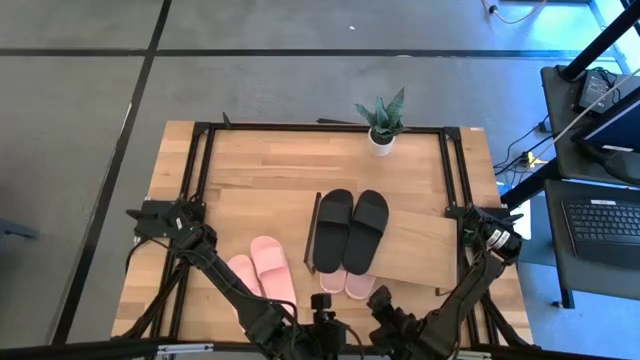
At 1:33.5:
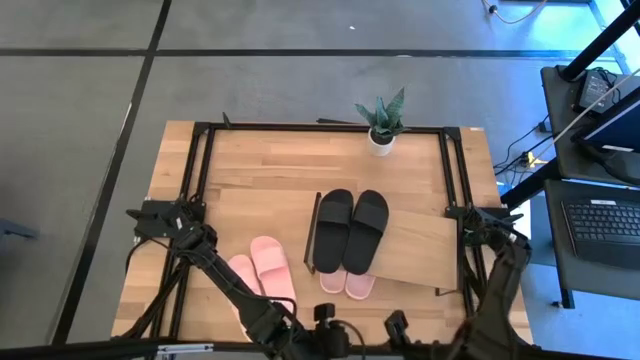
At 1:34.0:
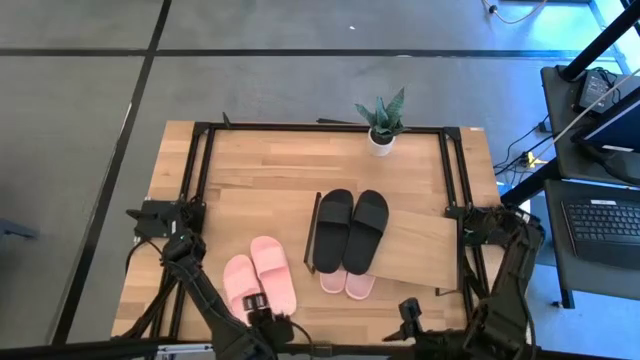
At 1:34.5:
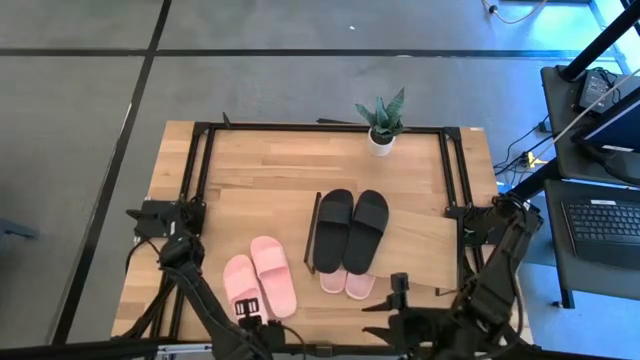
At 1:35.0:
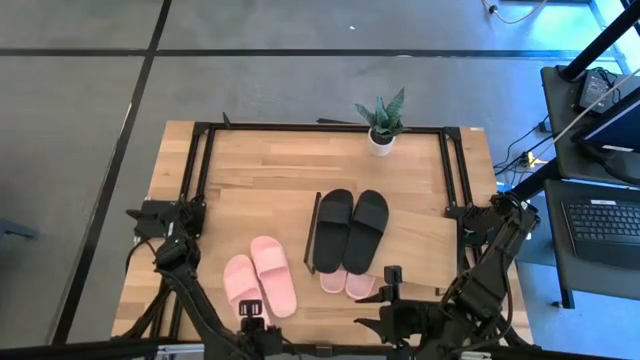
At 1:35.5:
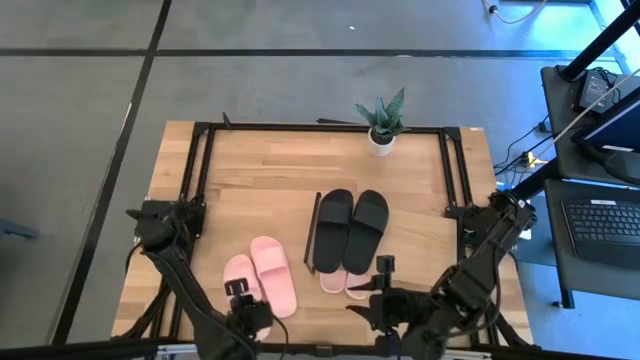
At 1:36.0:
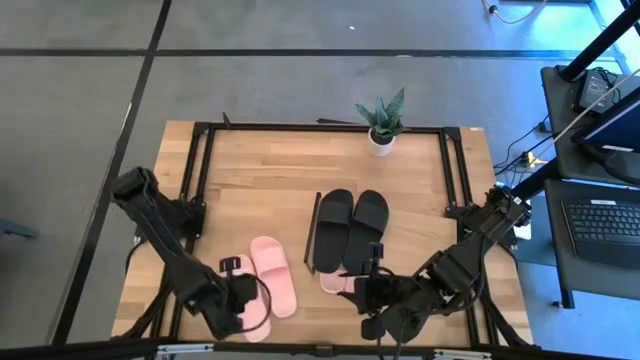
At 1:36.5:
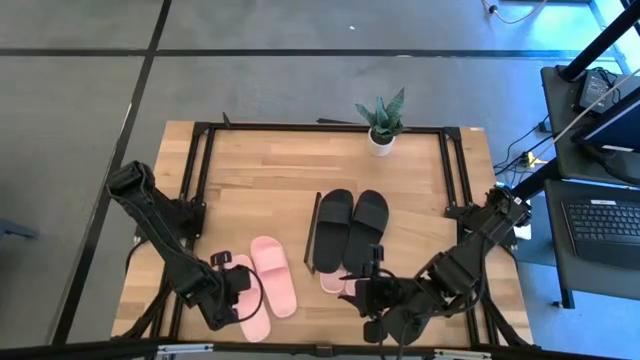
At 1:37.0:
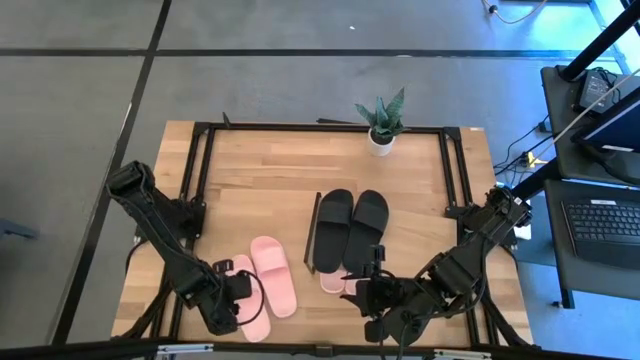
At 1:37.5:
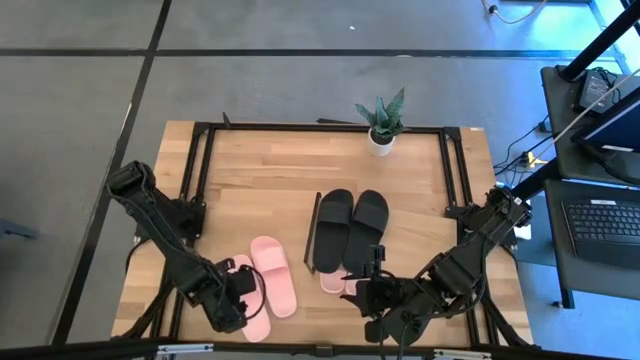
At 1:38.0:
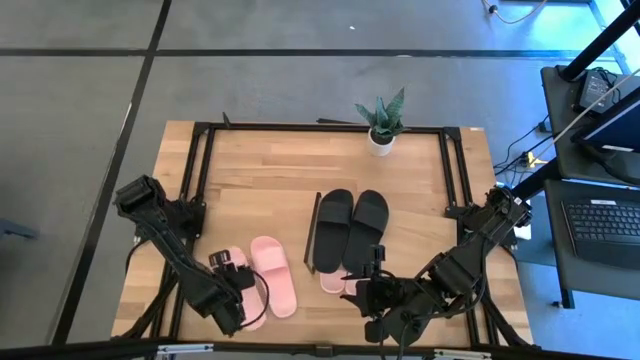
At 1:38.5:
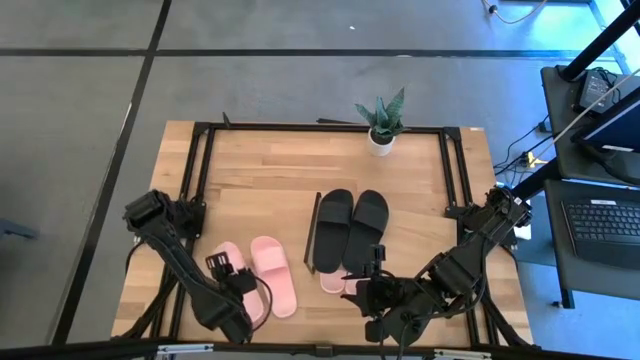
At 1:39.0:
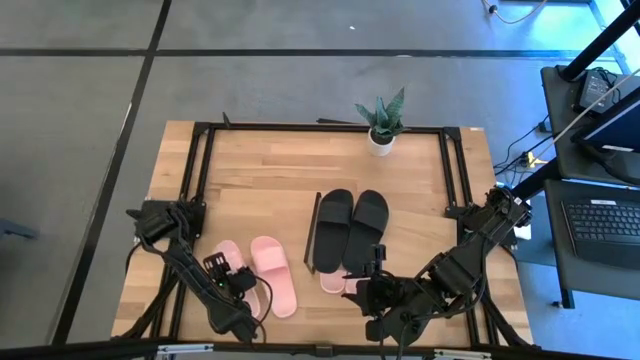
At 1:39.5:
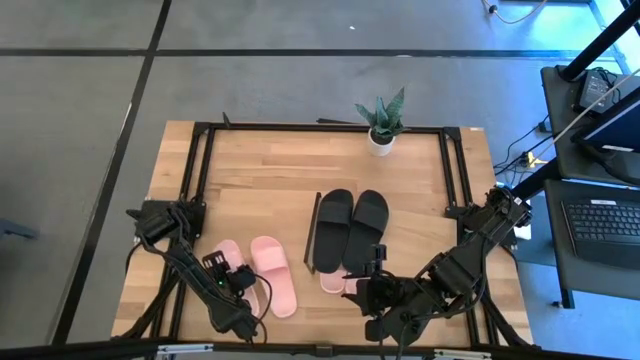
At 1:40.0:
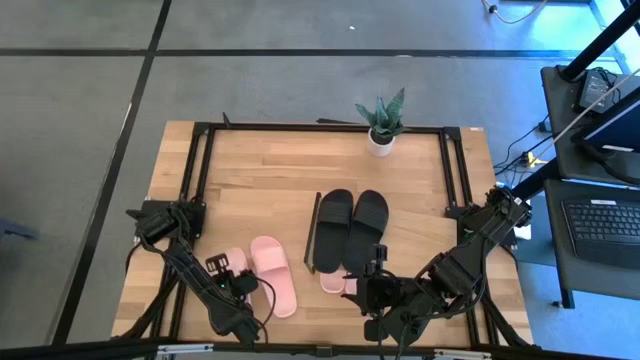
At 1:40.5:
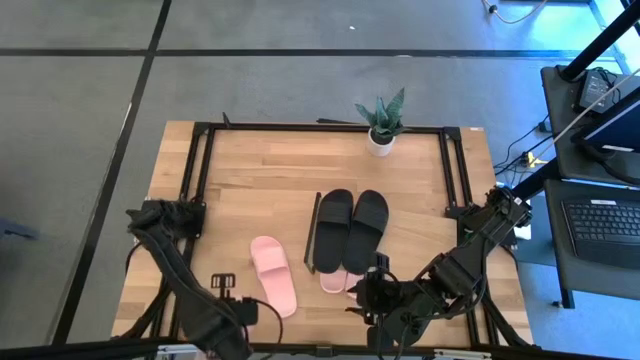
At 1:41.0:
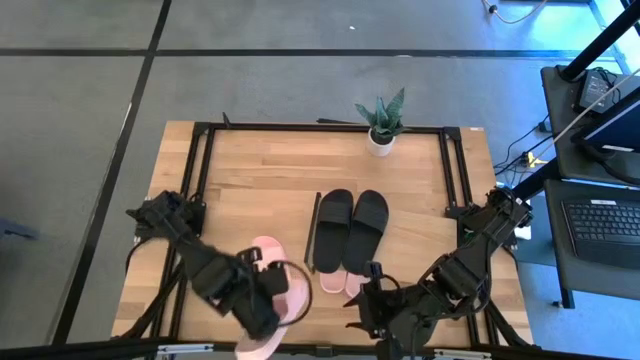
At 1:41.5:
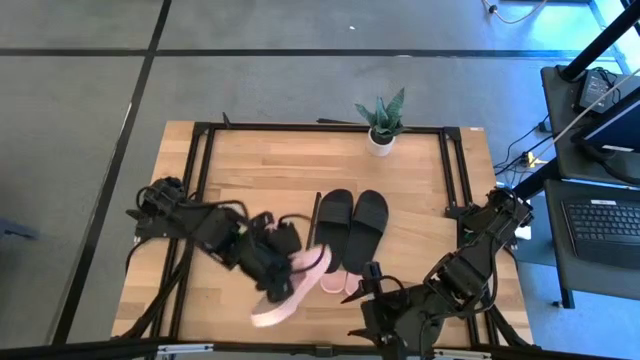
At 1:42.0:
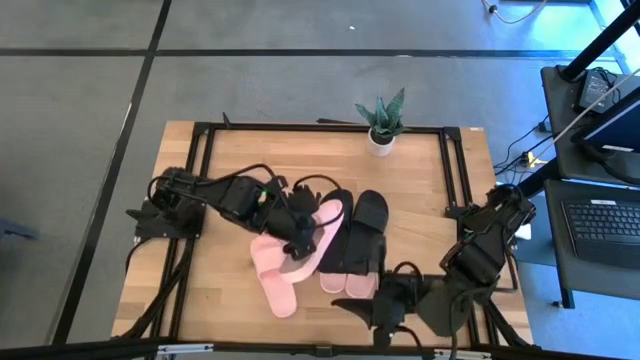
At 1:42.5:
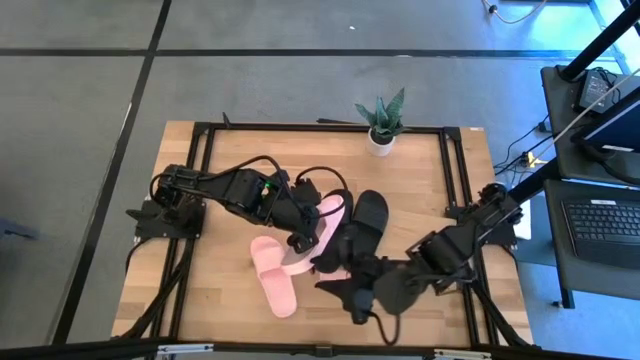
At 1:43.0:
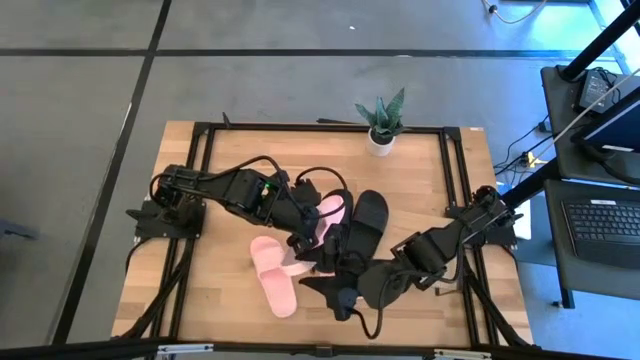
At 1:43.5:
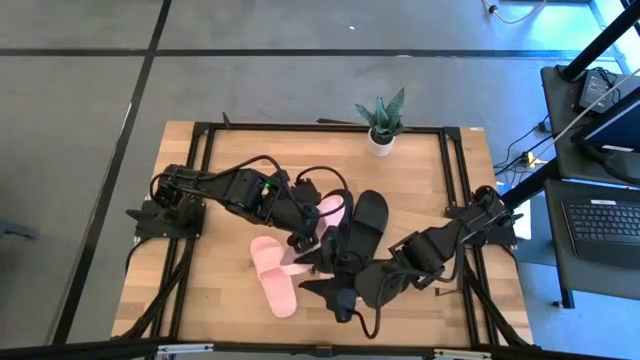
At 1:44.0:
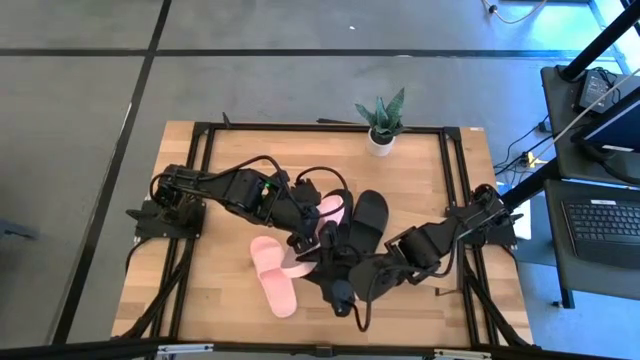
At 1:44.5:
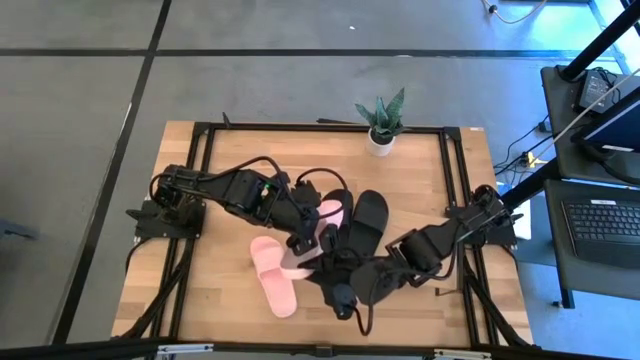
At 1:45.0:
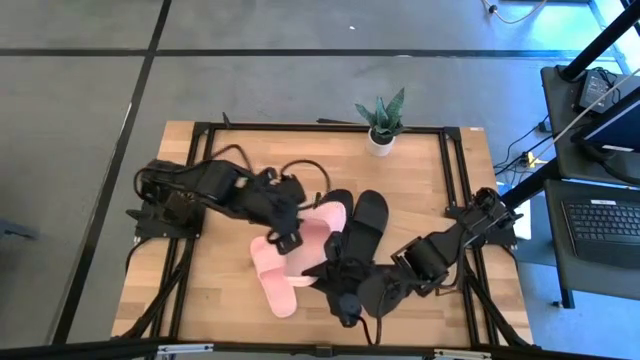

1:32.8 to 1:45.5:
Task: Pick and place slides into the shelf
Put the left pink slipper under the shelf

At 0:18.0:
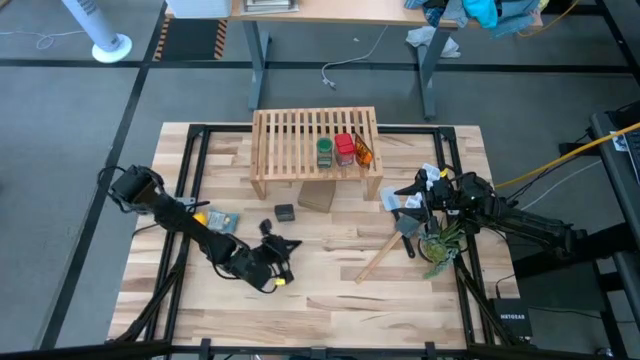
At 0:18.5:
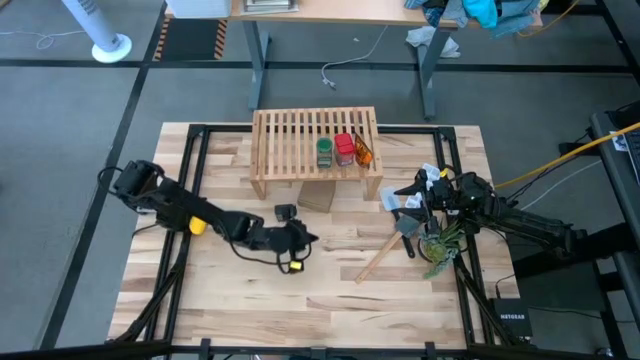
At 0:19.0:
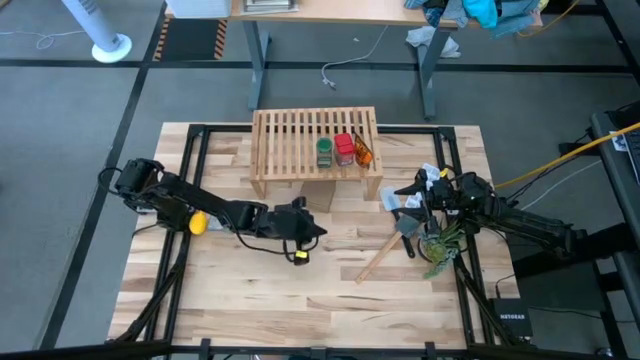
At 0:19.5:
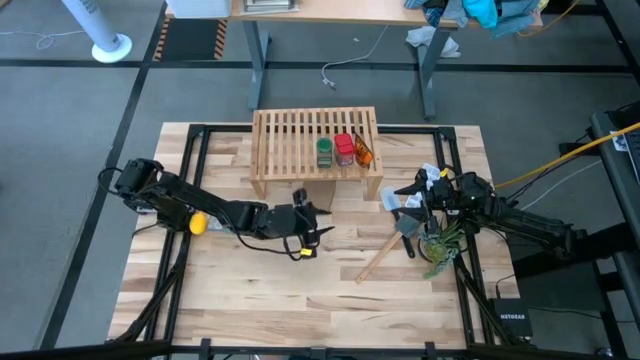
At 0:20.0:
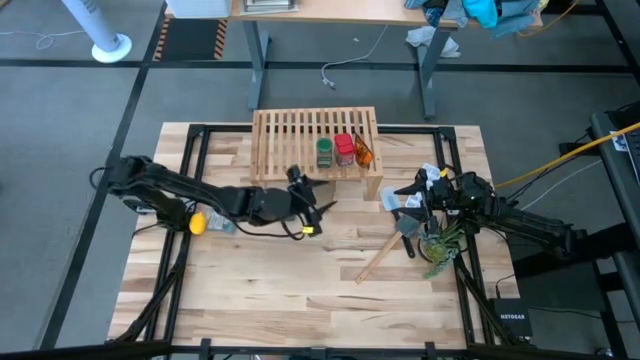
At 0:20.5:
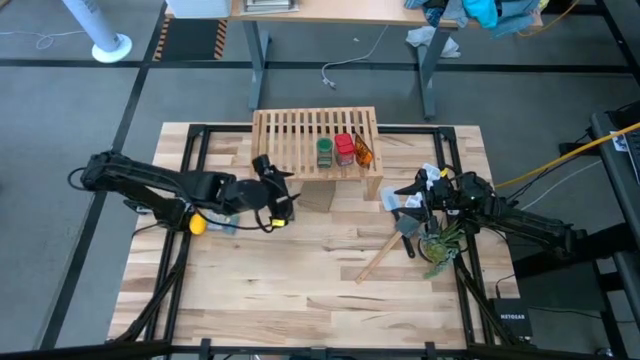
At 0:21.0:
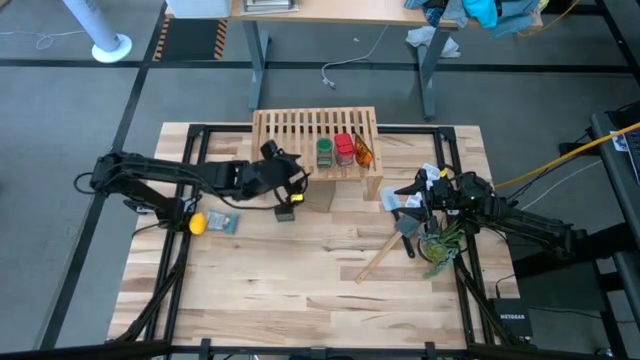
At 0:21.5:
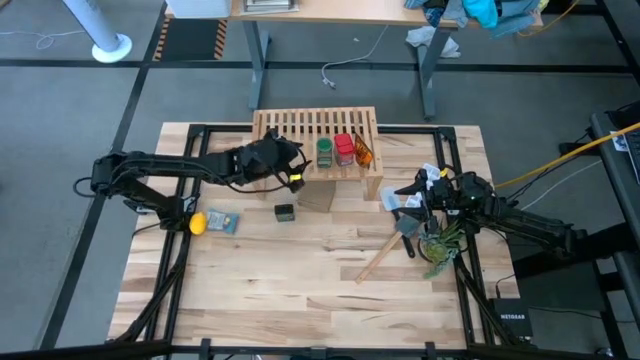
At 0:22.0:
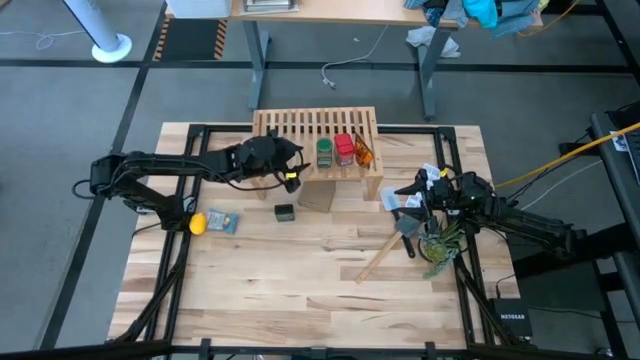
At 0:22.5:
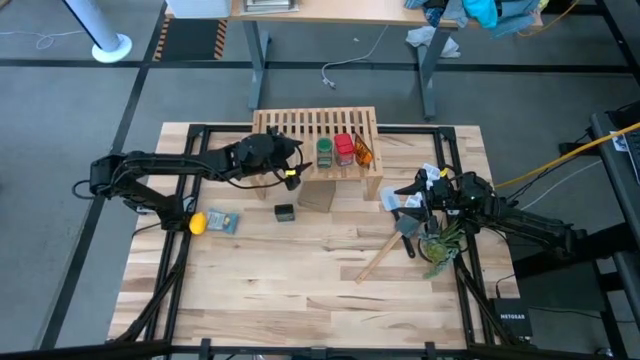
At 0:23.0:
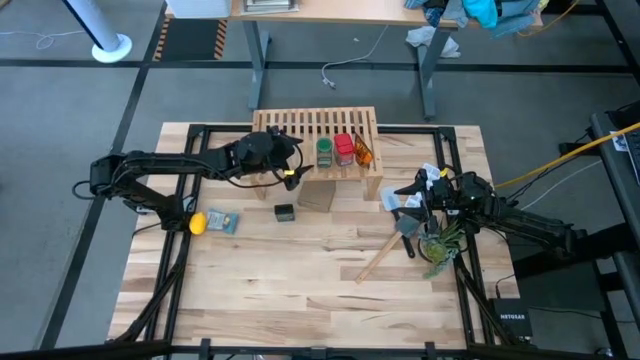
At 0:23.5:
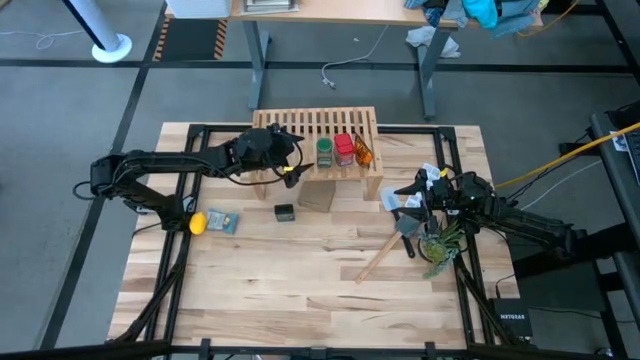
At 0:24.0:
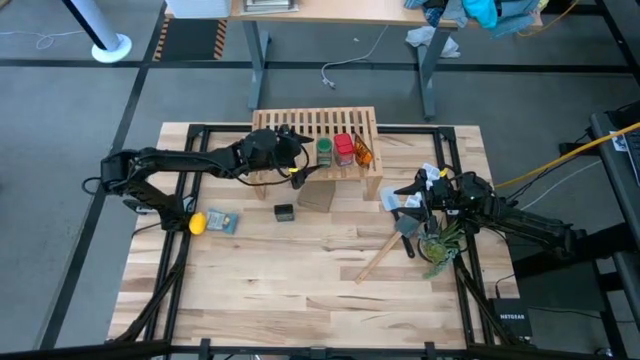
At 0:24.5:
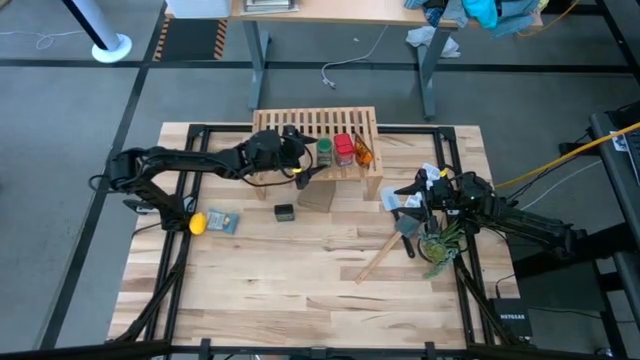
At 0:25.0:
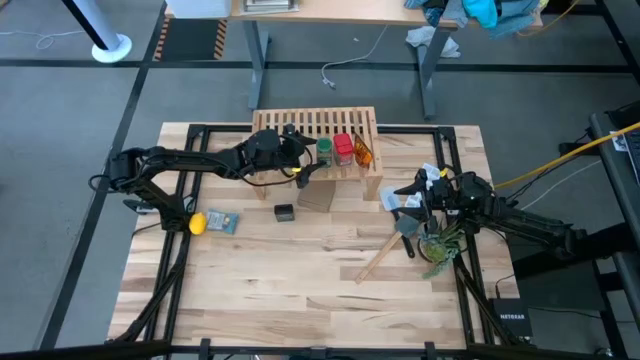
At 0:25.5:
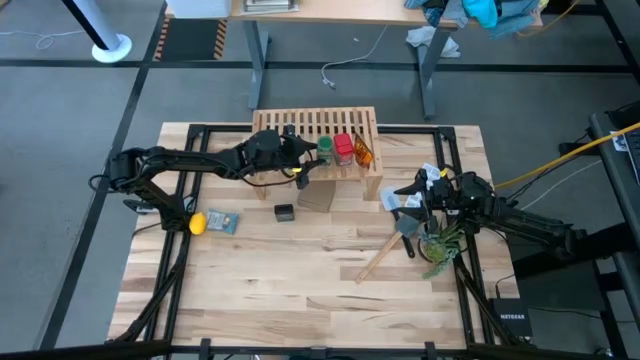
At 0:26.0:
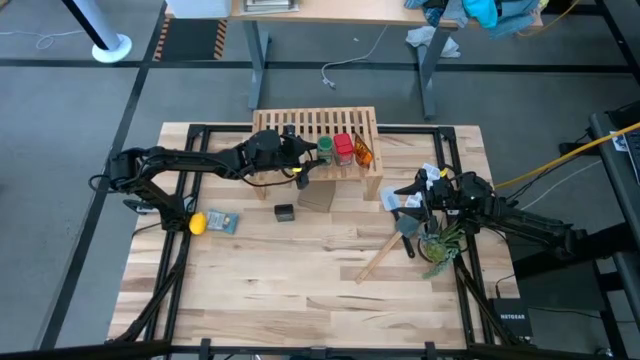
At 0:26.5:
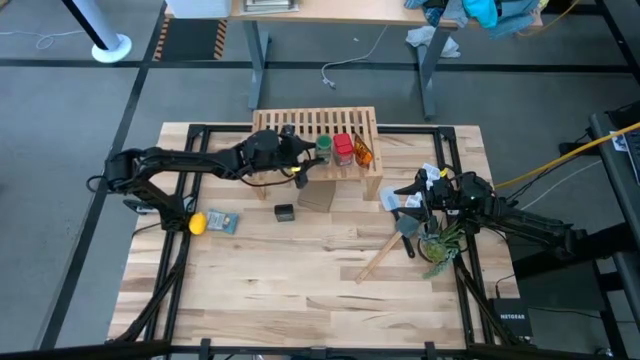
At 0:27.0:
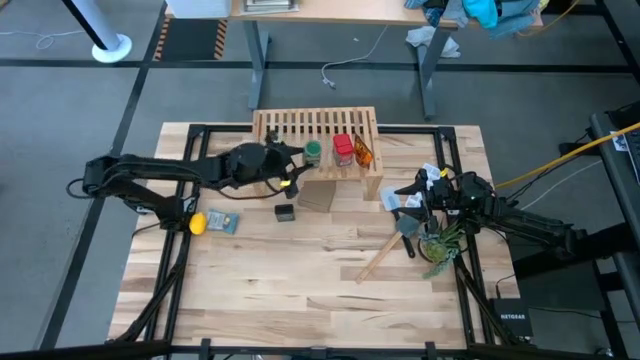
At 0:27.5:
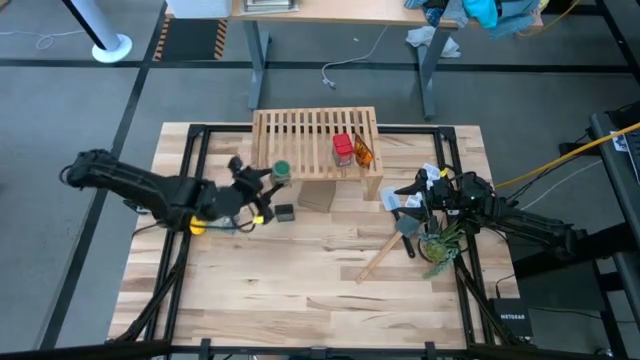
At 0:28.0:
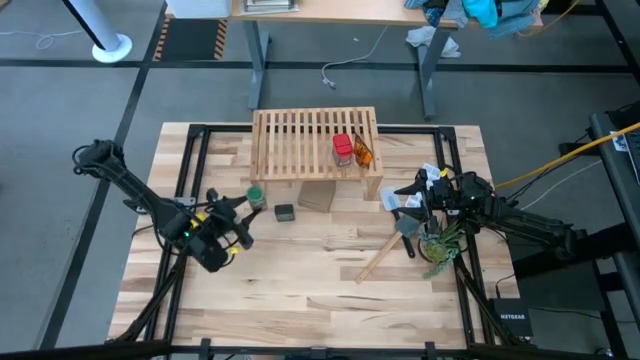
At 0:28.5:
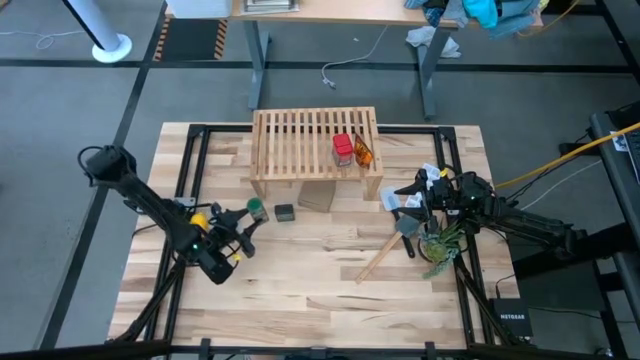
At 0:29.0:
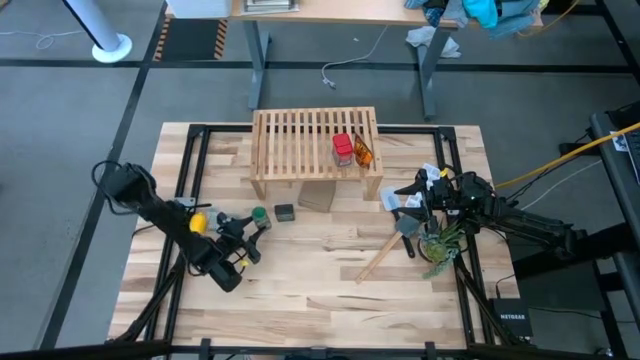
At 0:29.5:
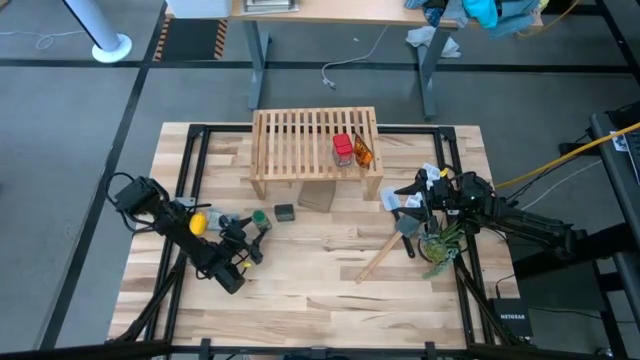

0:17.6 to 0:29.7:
Task: Shelf spices
Remove the green seasoning bottle from the shelf
